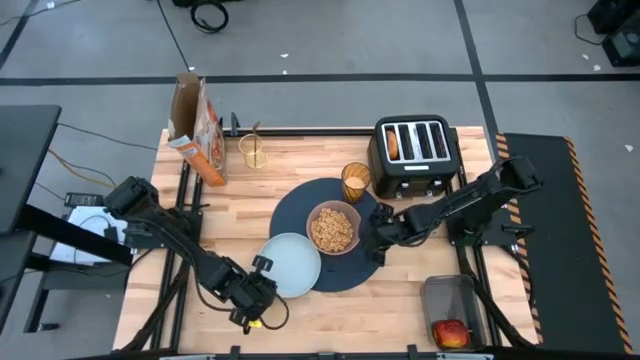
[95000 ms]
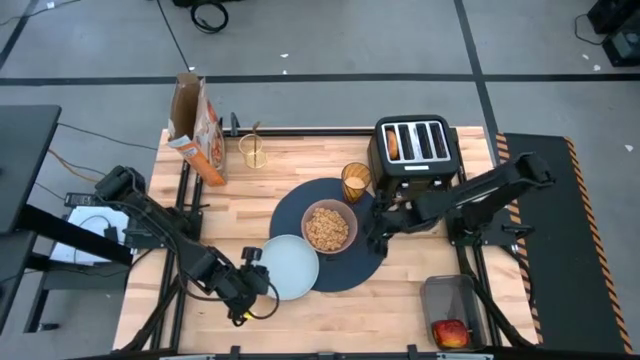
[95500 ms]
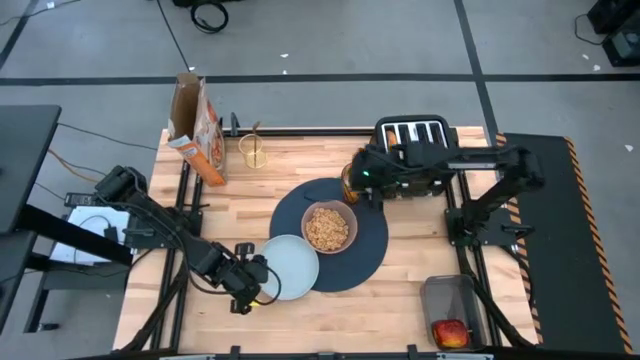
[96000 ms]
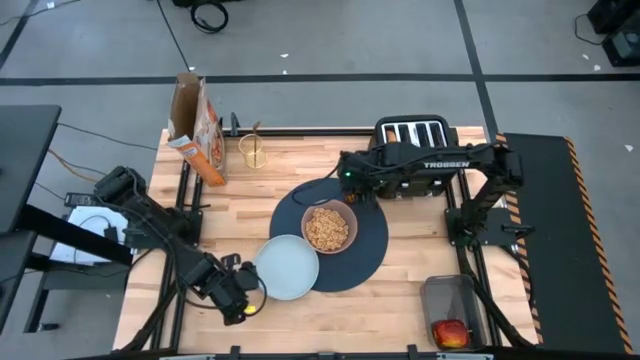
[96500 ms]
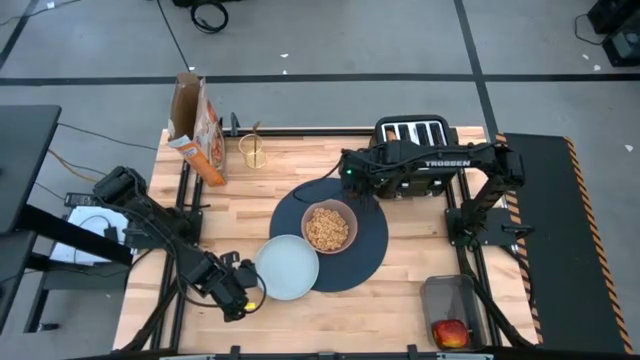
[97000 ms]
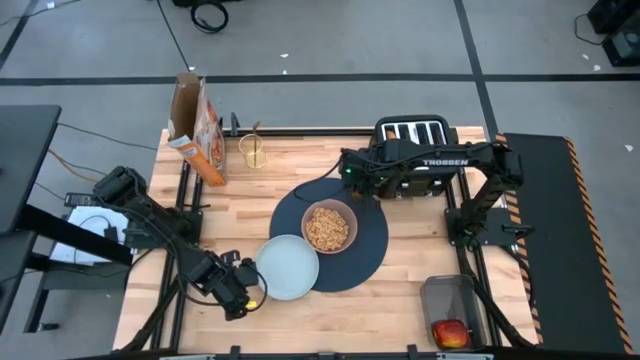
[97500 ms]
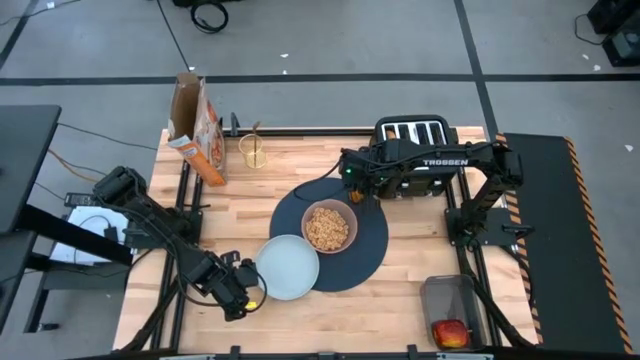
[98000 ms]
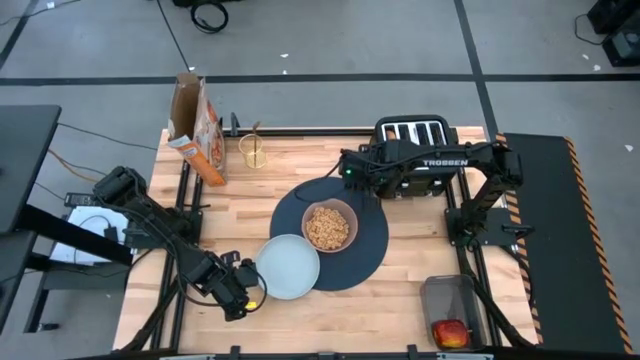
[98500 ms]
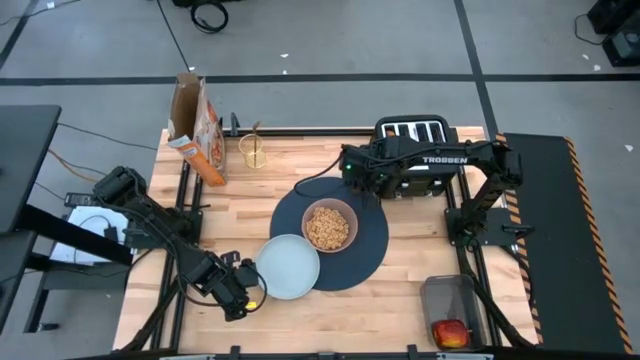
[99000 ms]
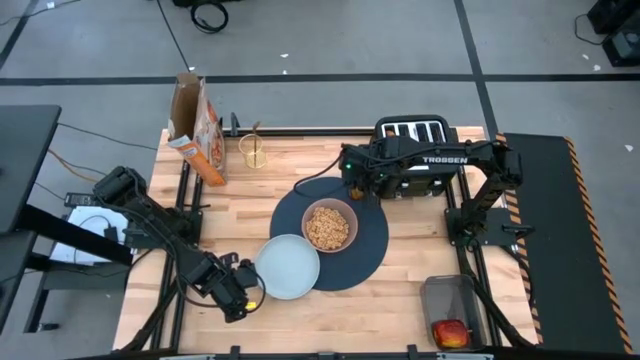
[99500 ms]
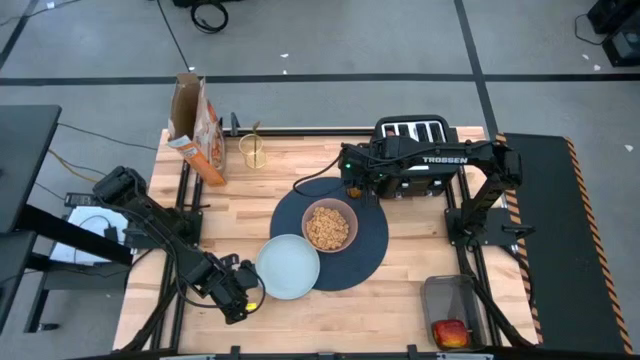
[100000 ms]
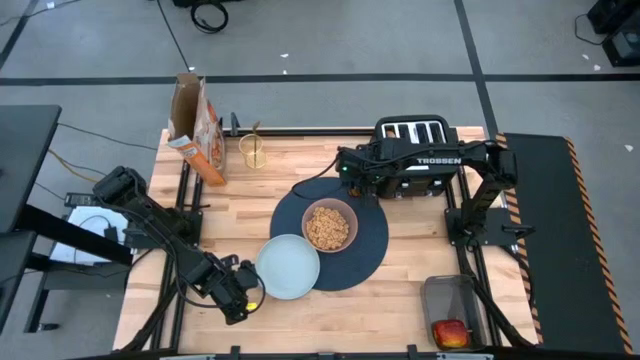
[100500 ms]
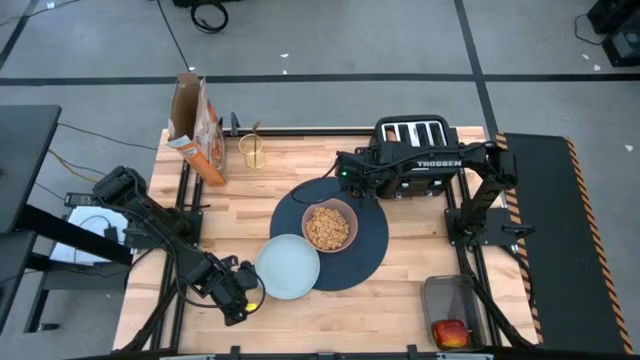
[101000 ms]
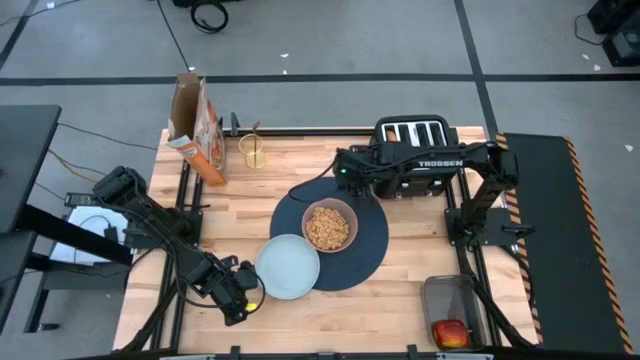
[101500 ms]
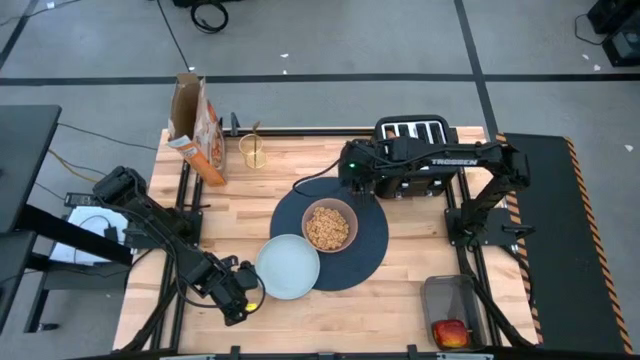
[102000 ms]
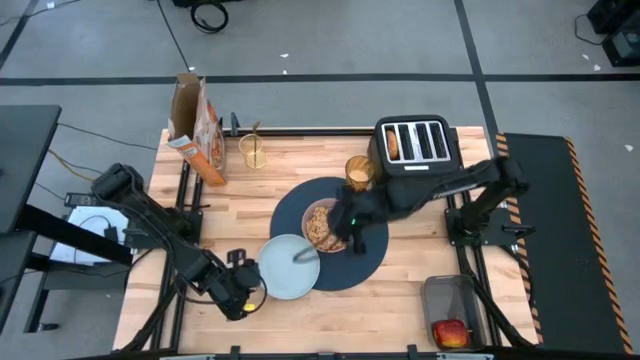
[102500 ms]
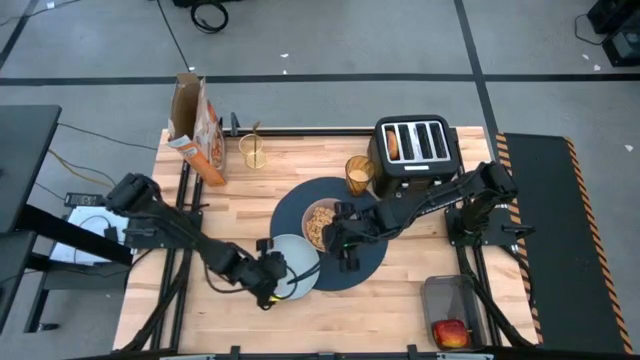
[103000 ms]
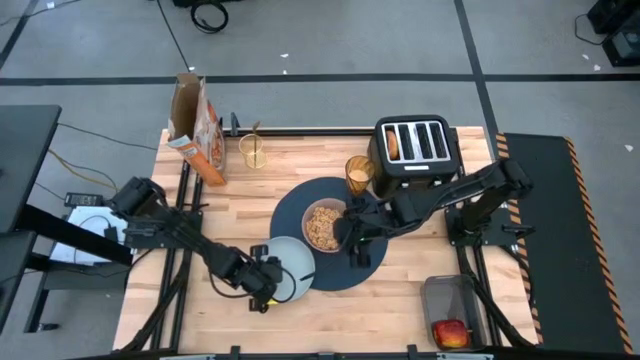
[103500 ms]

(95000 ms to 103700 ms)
Task: Arrange a breakfast setting
Adjust the light orange bowl, brown cup of milk, and blue plate

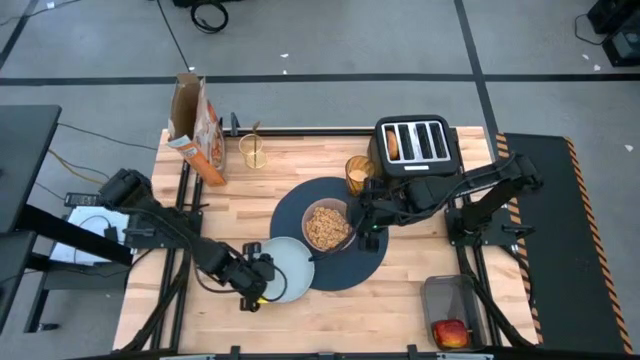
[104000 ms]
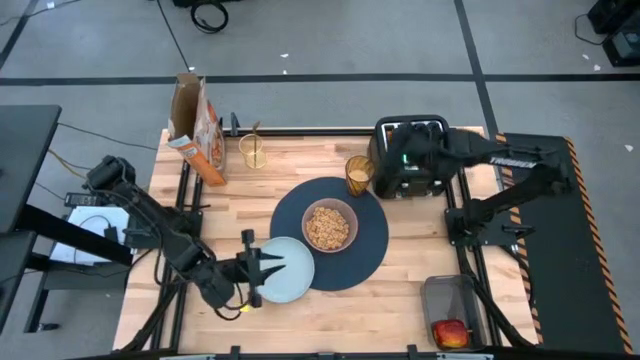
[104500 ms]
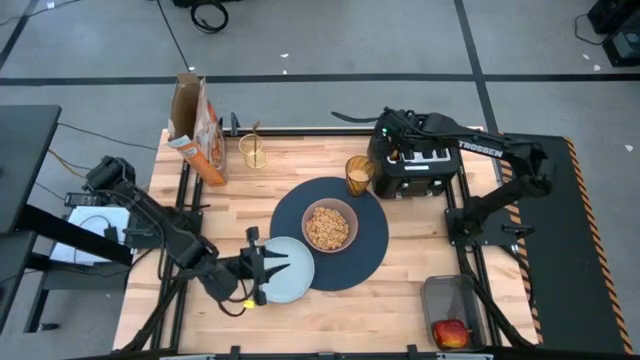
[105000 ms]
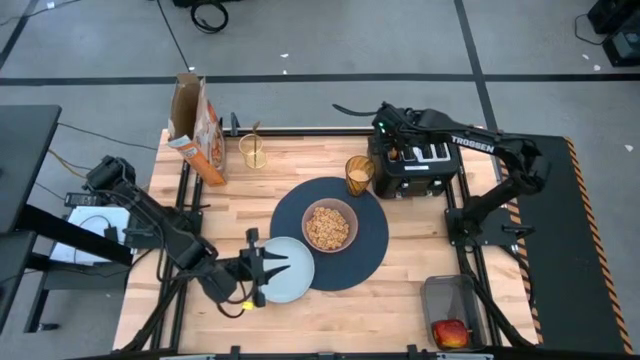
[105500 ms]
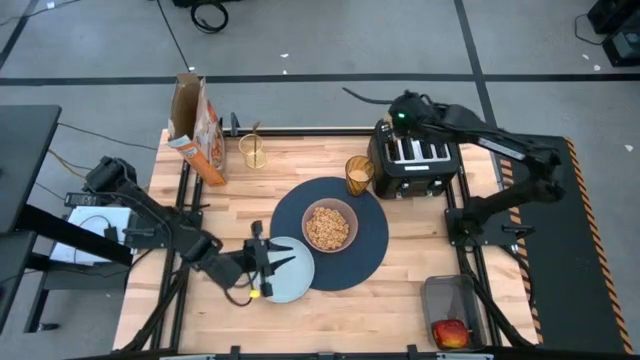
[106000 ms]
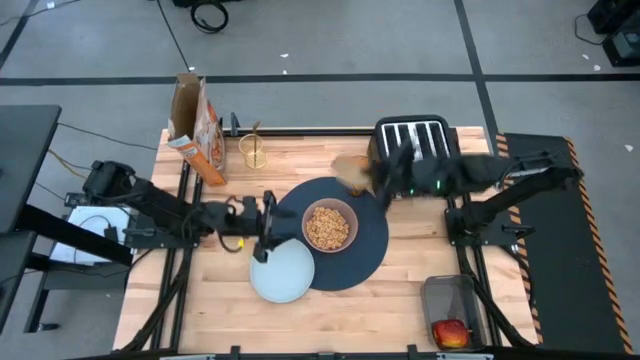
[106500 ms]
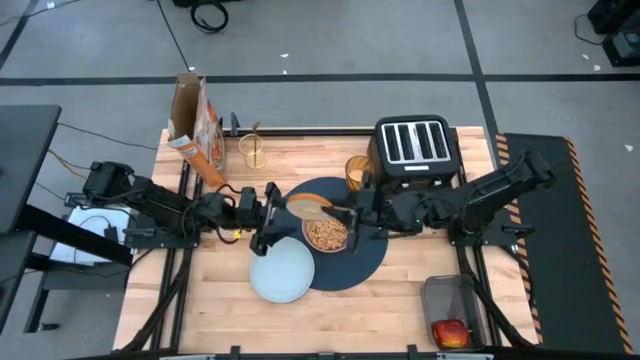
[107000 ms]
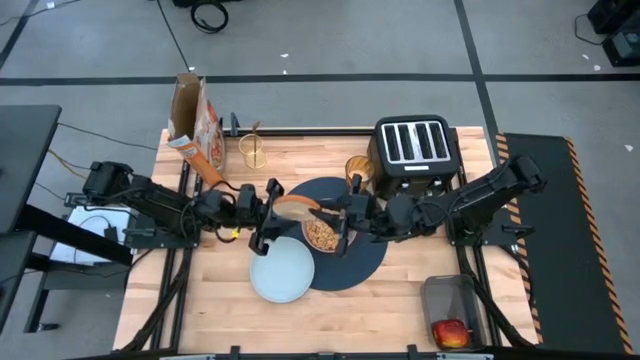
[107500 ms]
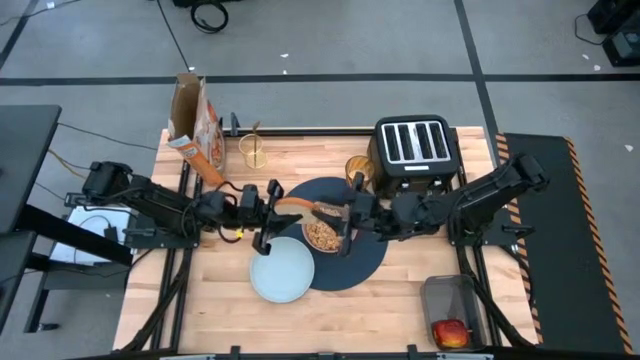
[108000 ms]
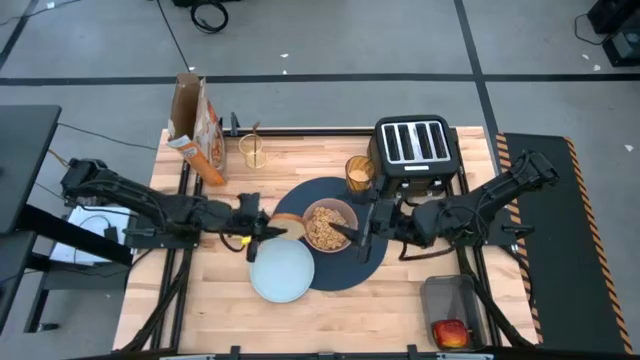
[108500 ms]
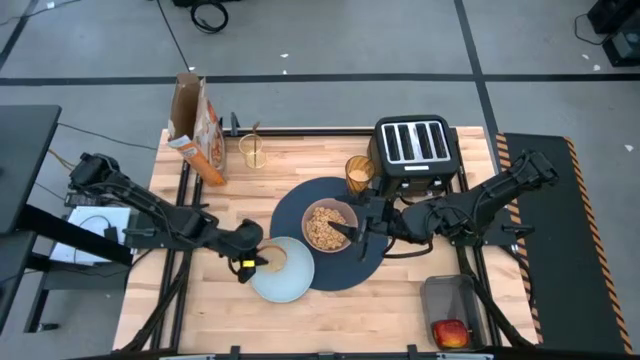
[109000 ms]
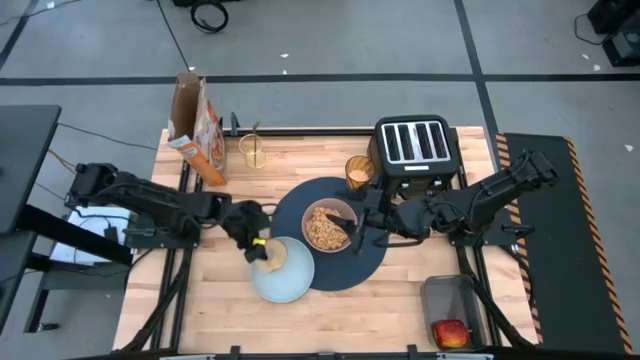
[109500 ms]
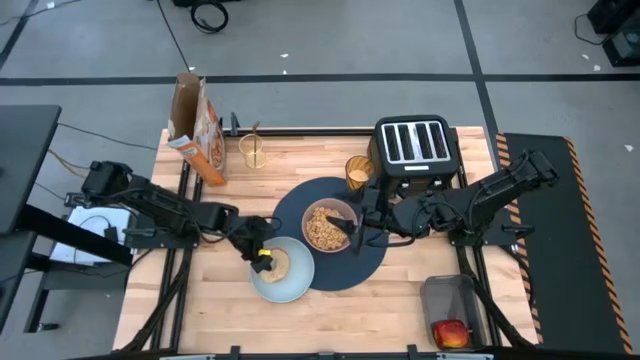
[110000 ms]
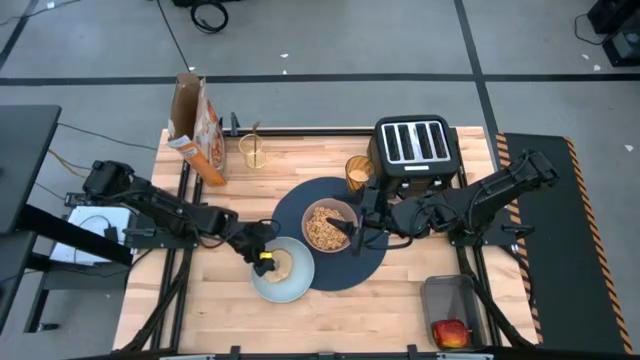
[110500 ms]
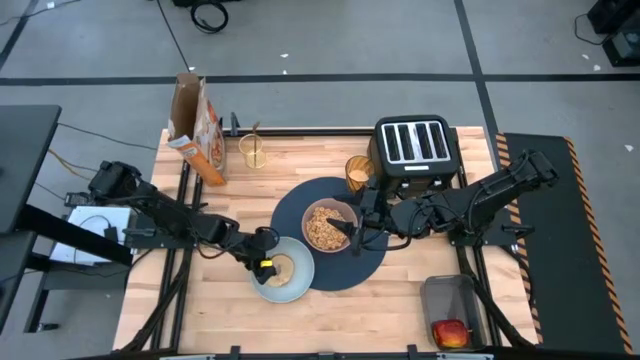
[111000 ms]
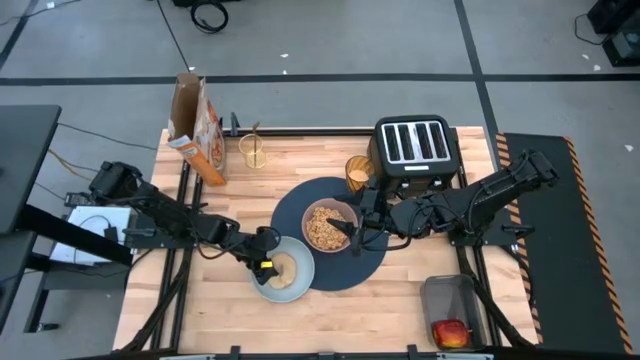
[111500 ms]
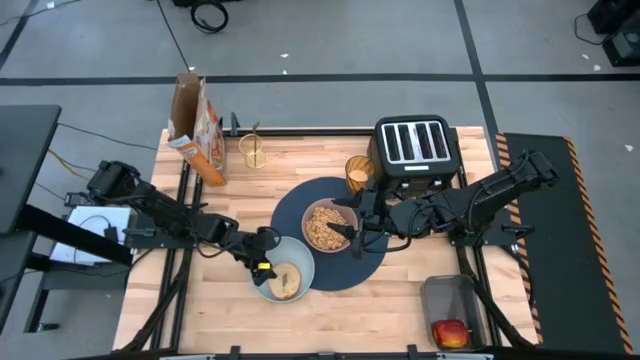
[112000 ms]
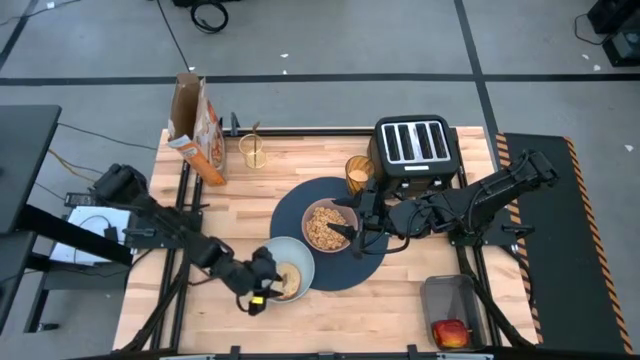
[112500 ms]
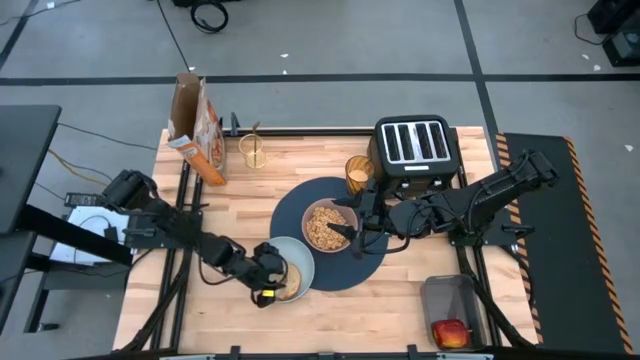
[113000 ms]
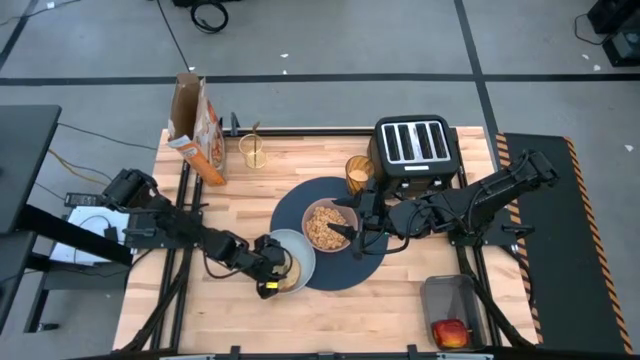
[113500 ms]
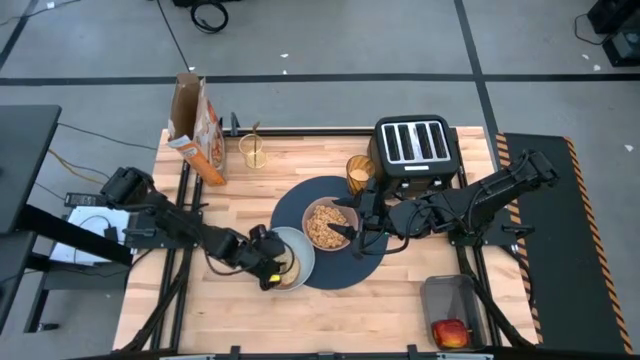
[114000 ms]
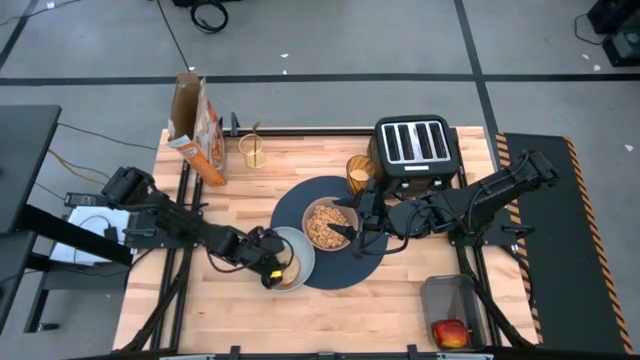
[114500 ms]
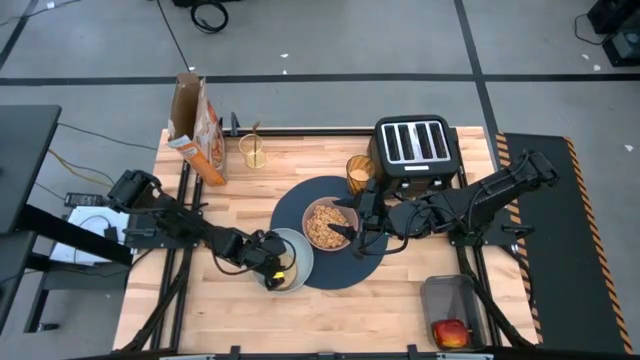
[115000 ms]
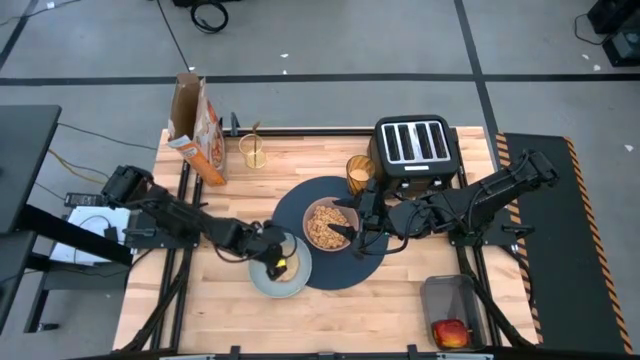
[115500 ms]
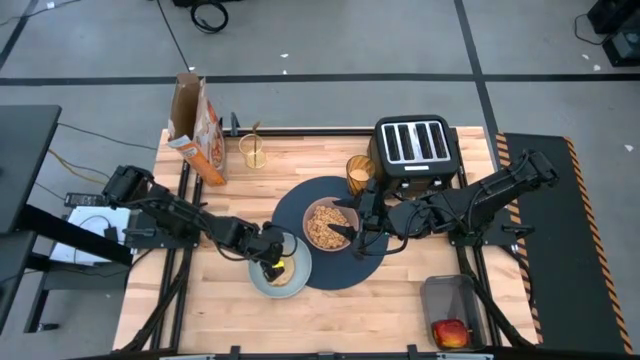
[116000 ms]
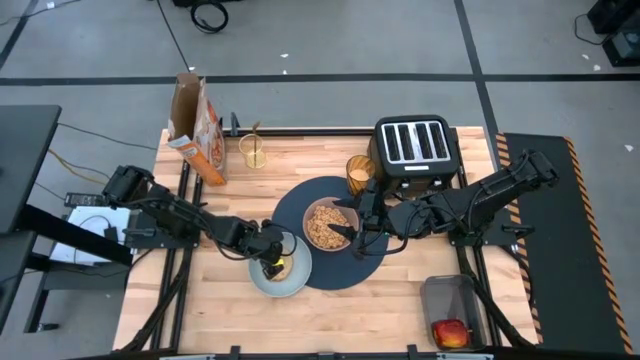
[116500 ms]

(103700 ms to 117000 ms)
Put the toasted bagel on the blue plate

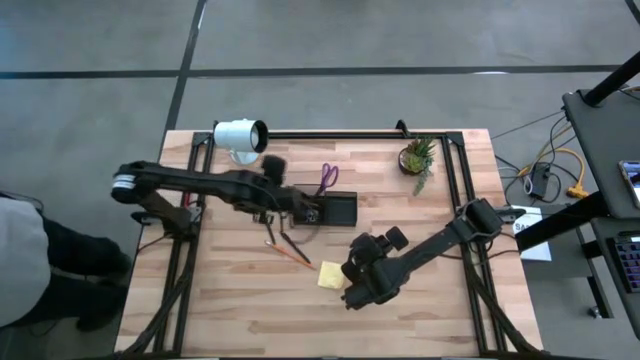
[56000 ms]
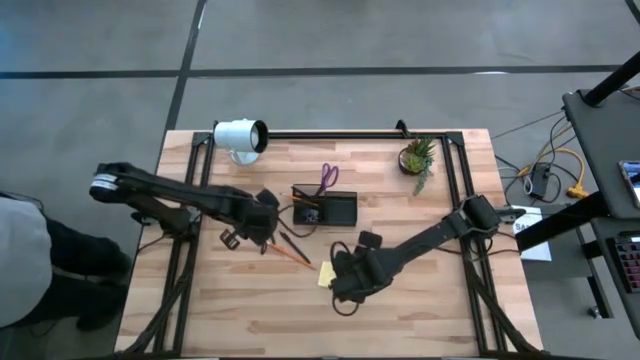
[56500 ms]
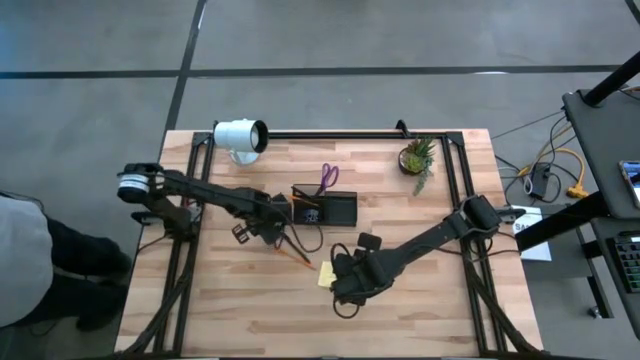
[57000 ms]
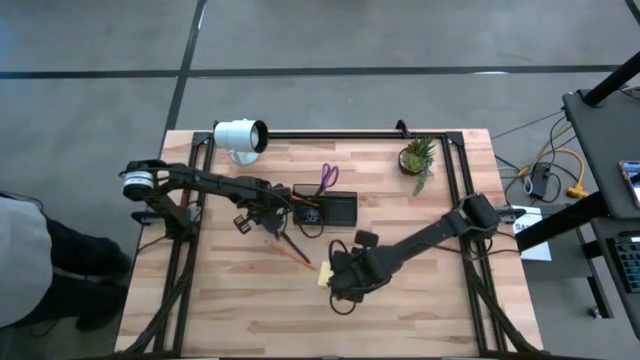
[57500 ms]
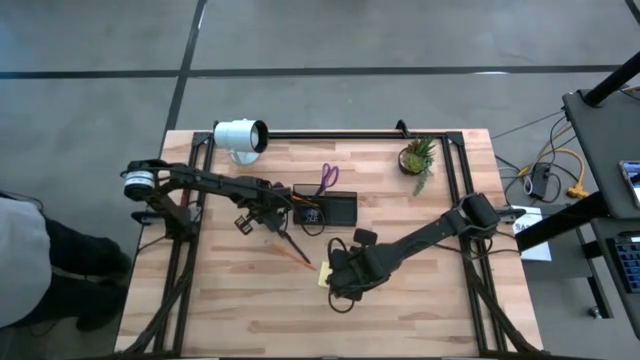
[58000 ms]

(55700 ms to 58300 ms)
Task: Pick and place office supplies into organizer
Put the top black pen into the black desk organizer
